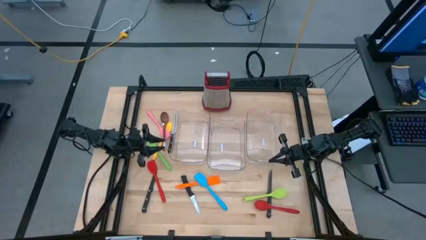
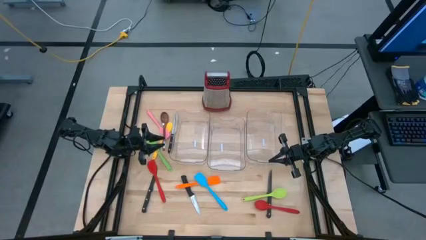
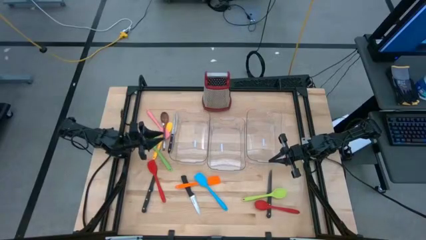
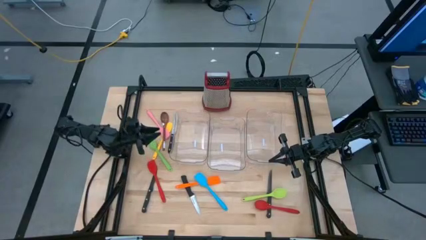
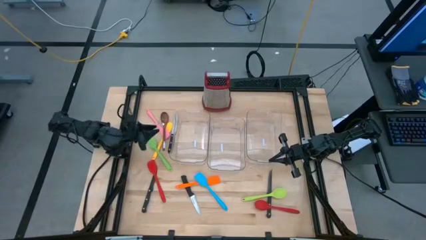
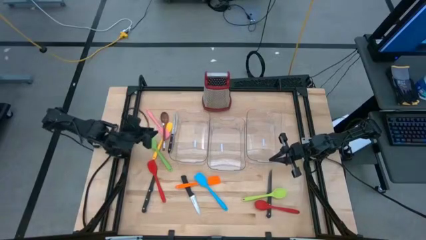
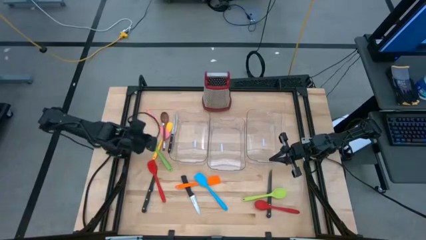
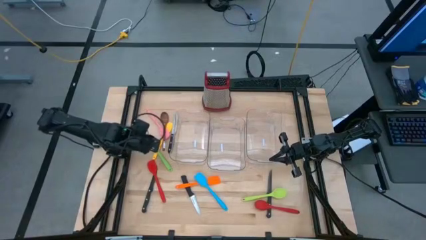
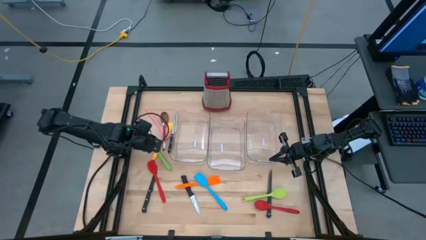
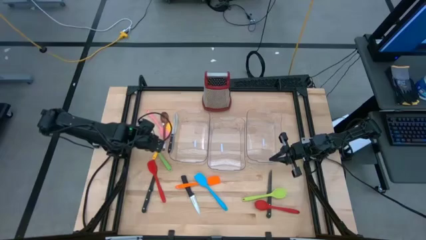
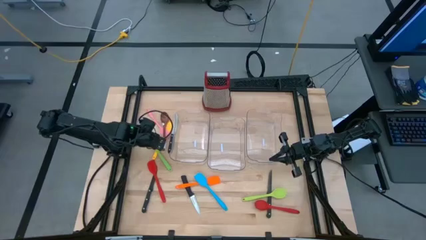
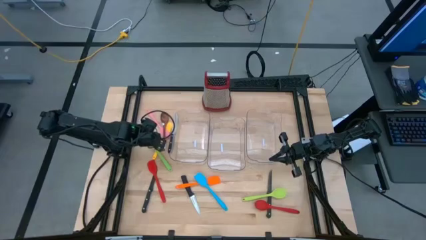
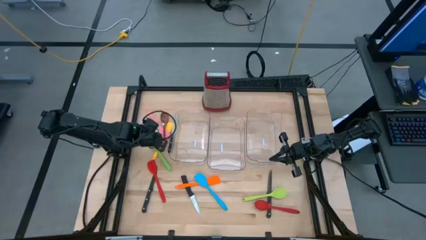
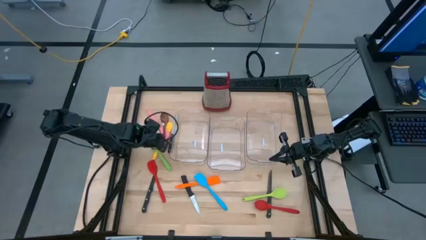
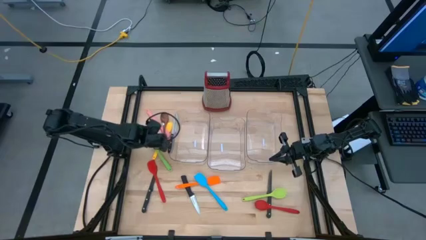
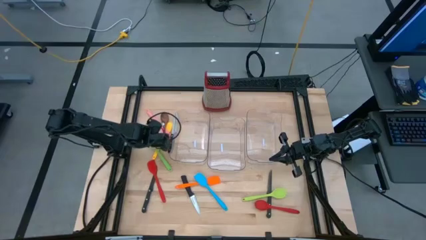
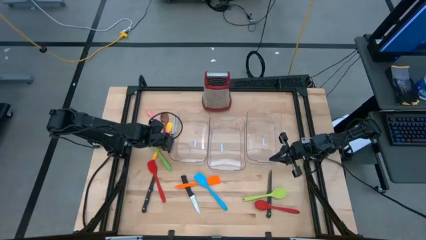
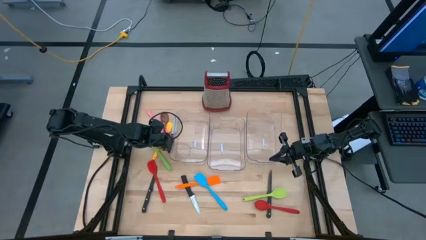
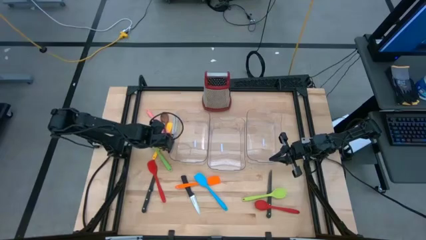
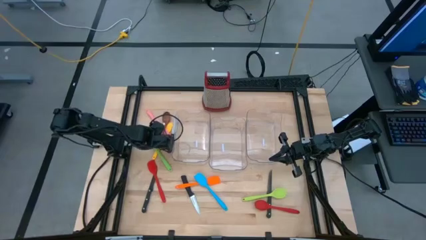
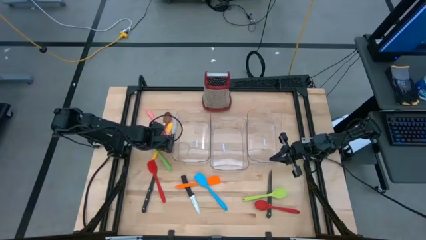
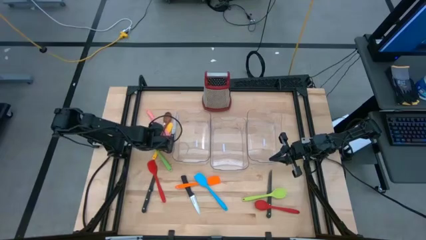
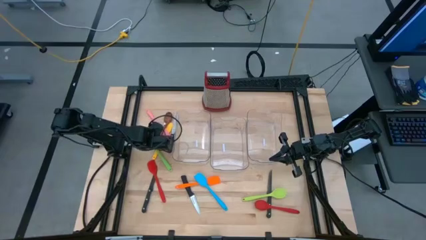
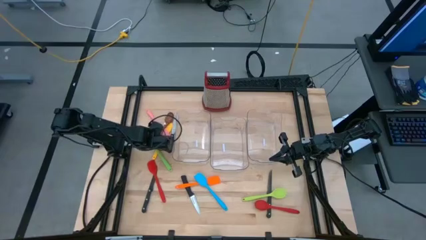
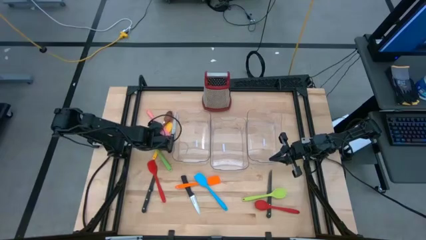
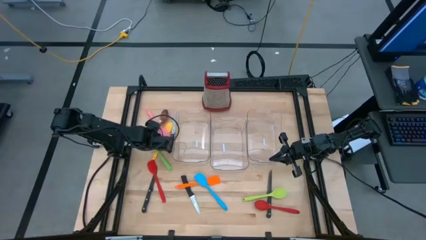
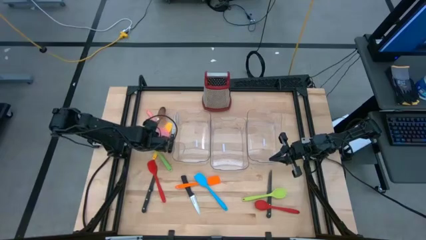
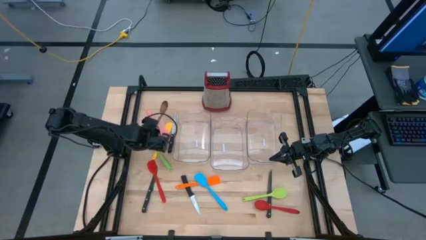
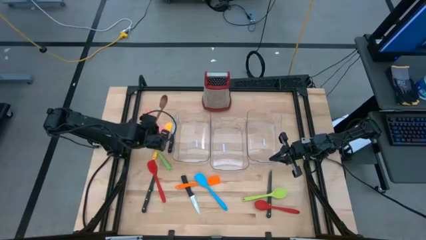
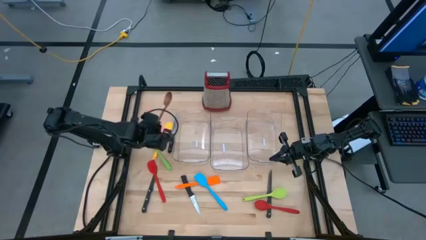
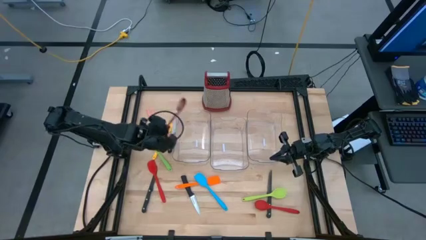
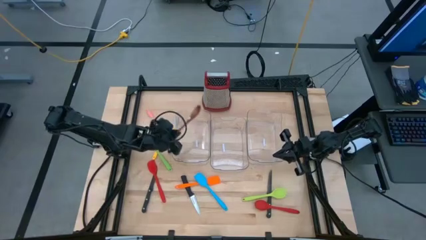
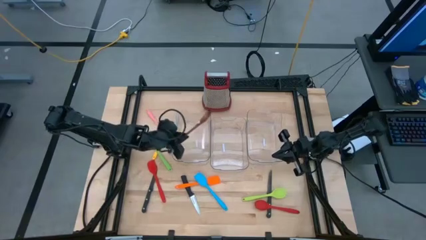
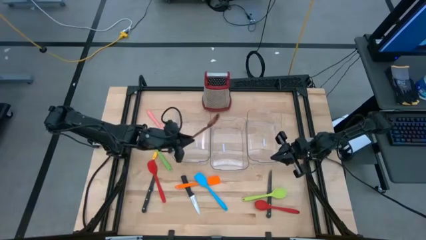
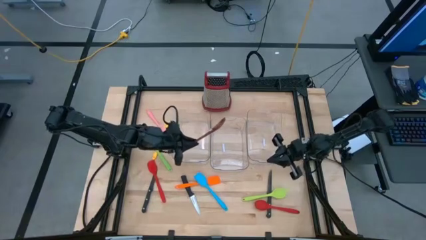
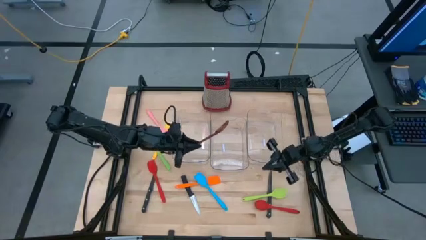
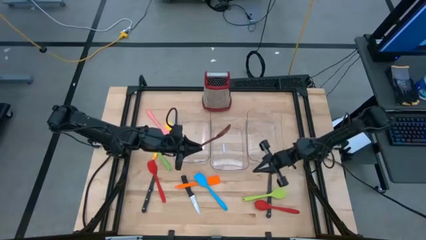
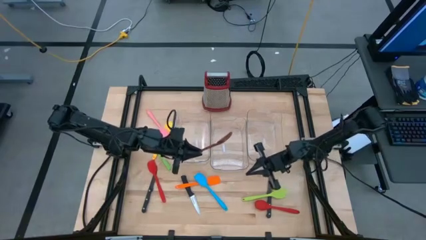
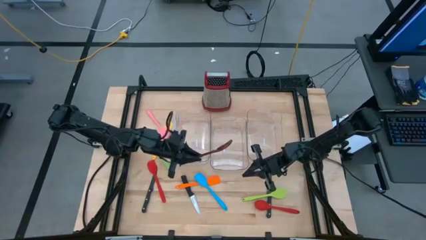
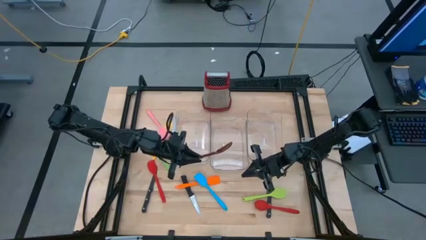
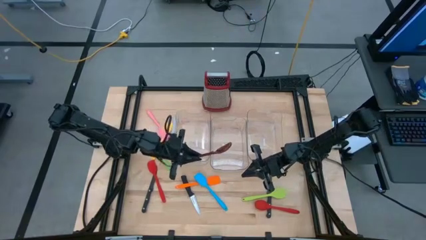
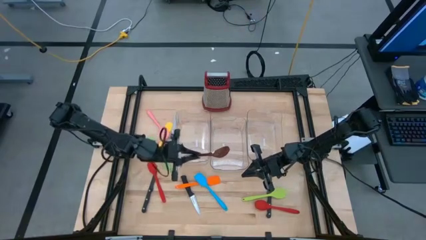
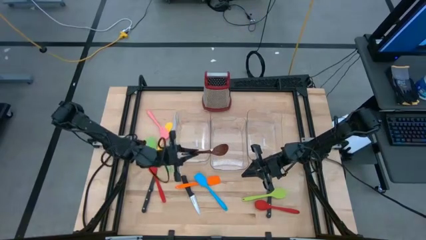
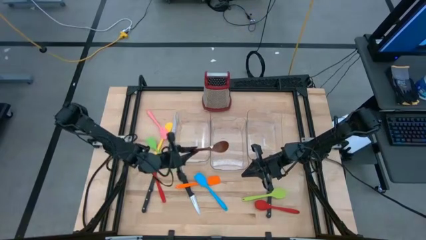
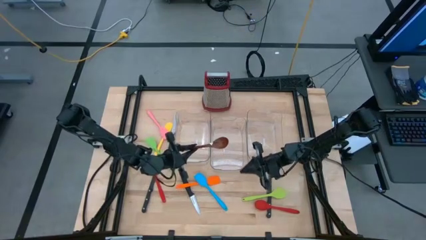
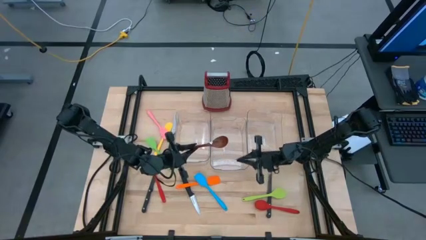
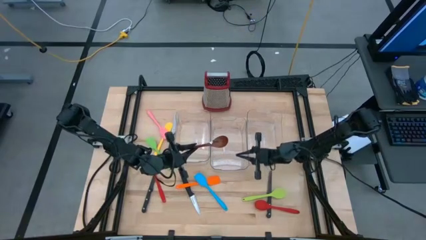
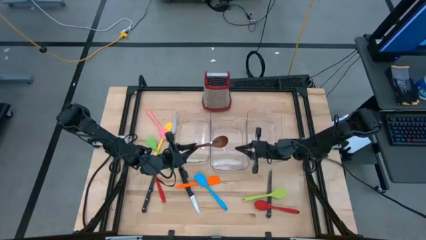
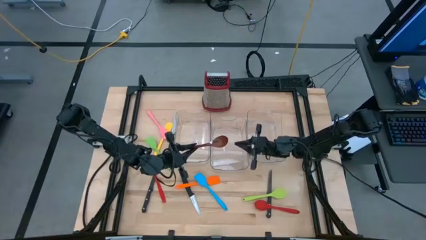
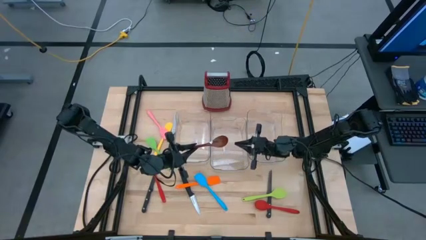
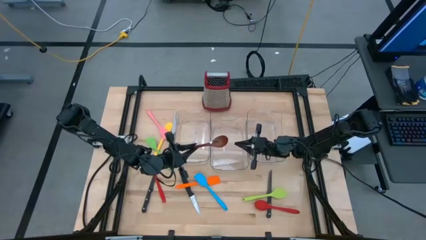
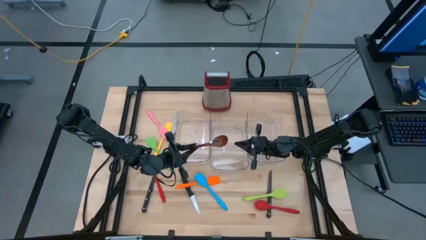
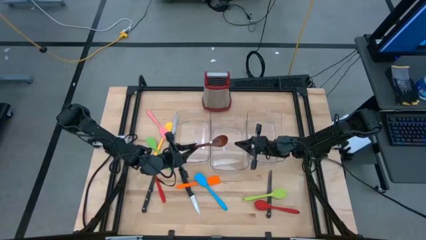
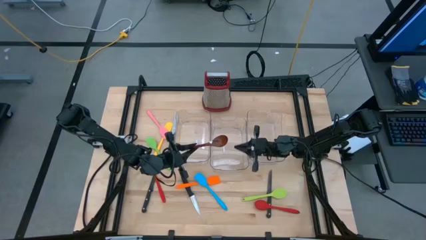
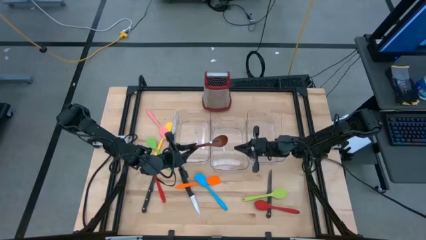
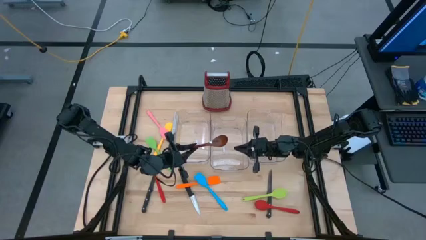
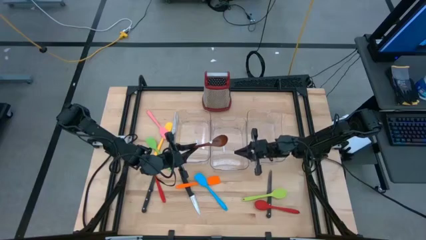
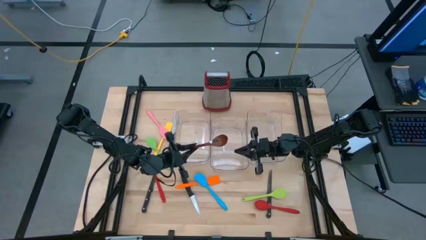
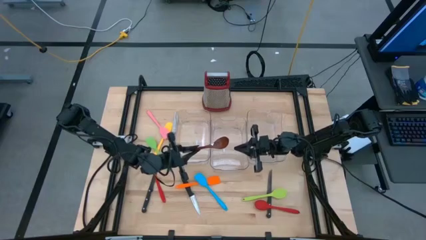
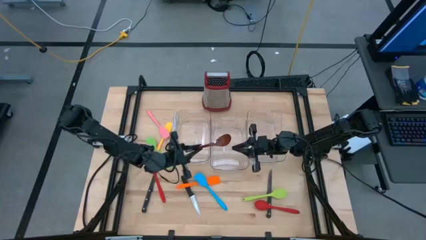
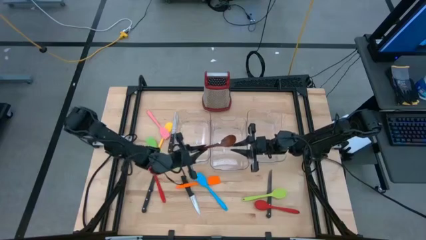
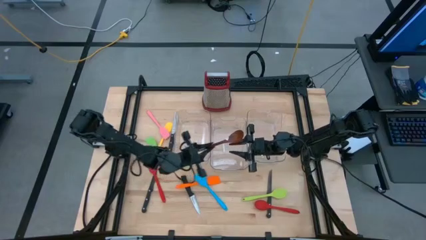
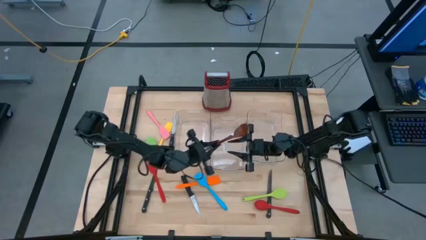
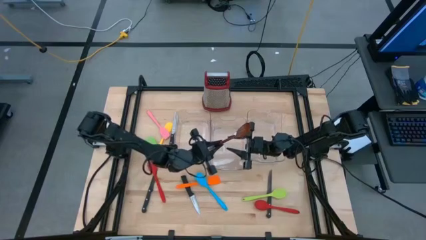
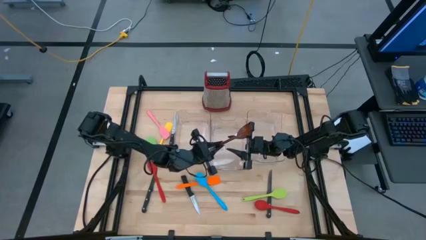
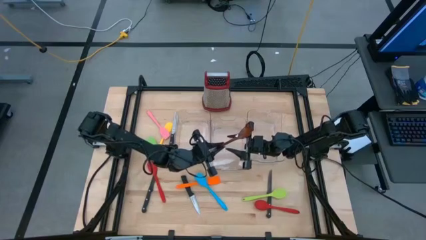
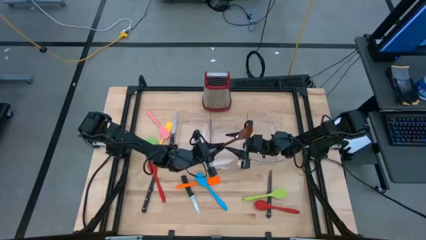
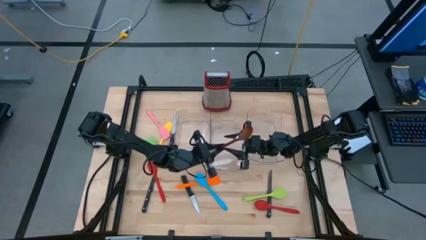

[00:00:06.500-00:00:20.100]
Task: Pick & Place Kitchen Items
Put the wooden serving spoon into the right transparent bin
